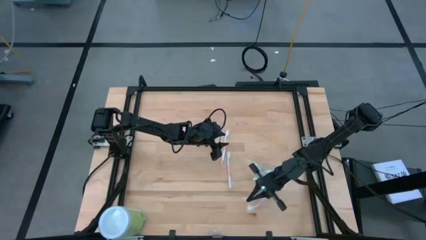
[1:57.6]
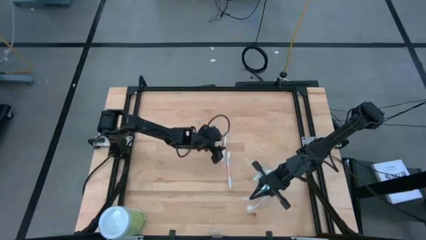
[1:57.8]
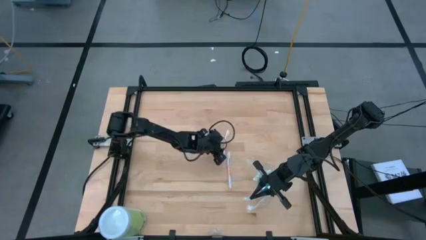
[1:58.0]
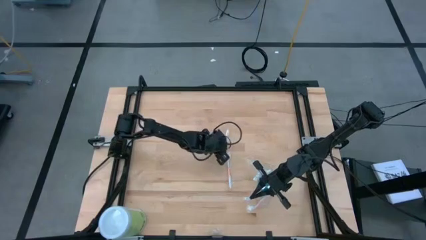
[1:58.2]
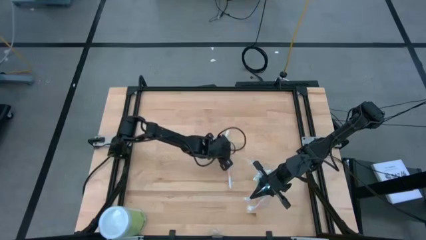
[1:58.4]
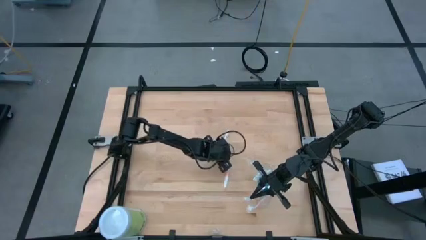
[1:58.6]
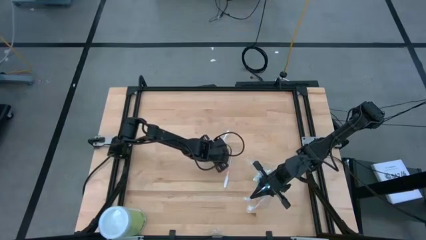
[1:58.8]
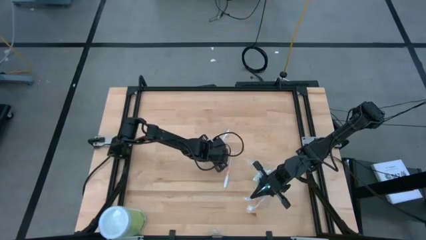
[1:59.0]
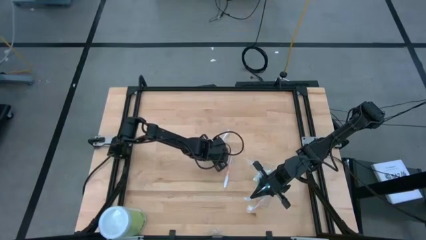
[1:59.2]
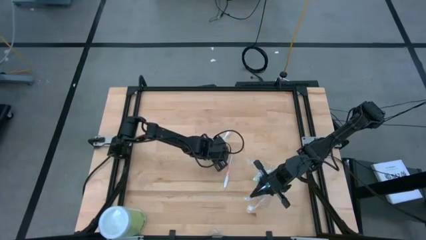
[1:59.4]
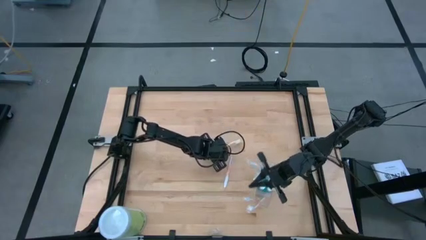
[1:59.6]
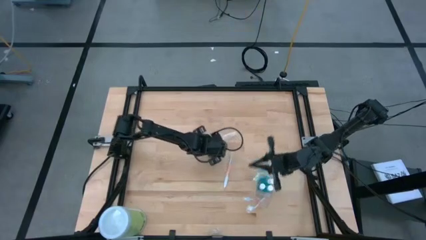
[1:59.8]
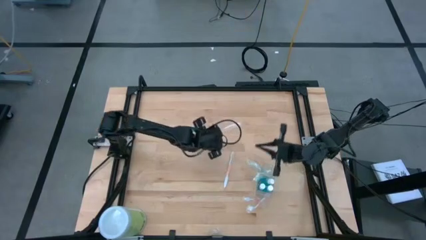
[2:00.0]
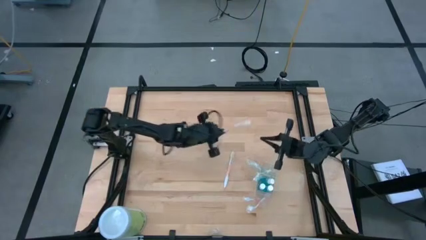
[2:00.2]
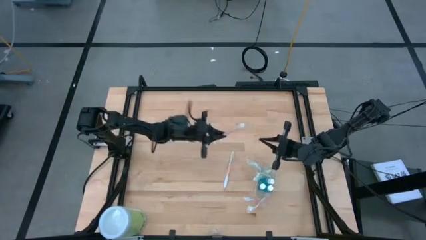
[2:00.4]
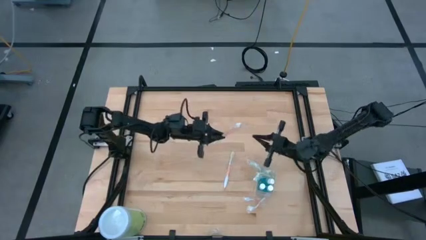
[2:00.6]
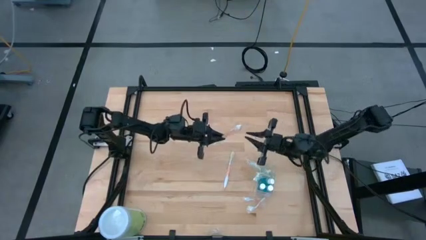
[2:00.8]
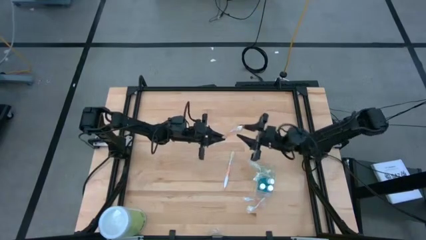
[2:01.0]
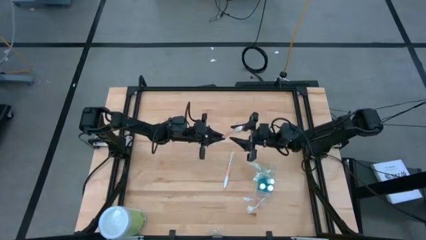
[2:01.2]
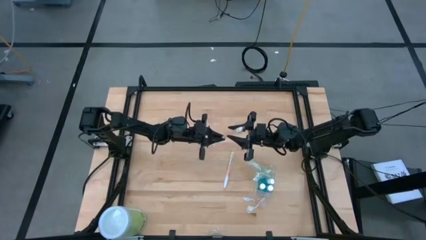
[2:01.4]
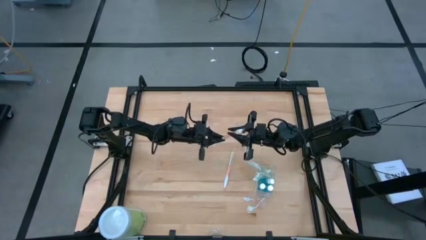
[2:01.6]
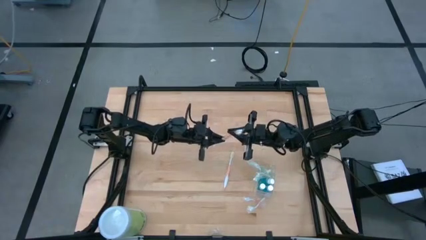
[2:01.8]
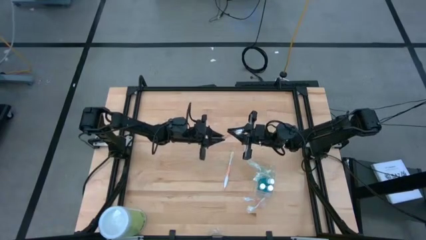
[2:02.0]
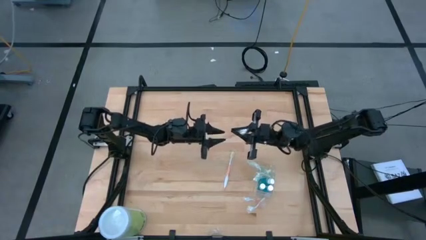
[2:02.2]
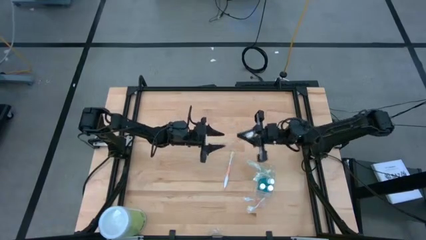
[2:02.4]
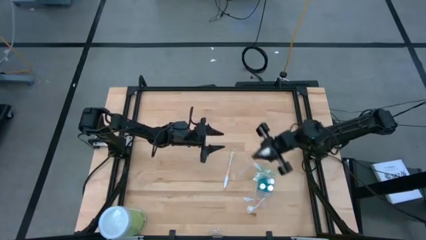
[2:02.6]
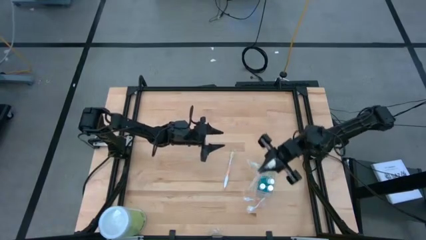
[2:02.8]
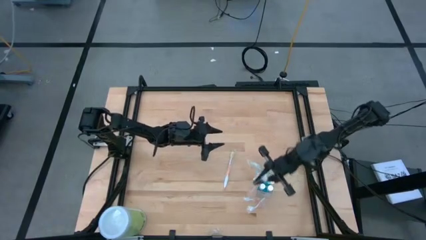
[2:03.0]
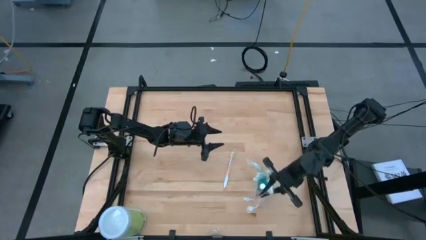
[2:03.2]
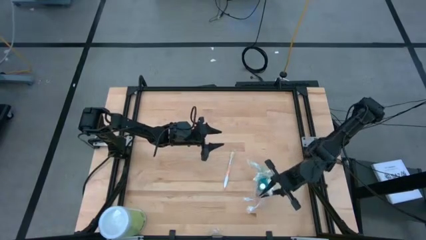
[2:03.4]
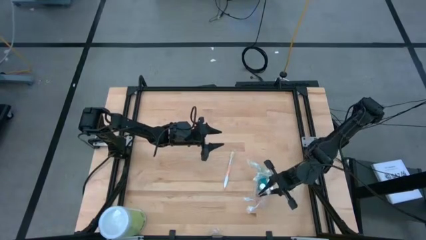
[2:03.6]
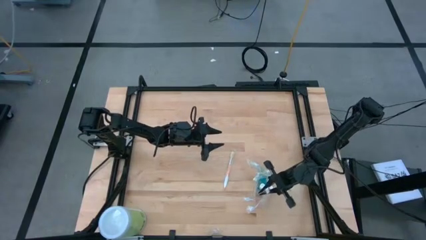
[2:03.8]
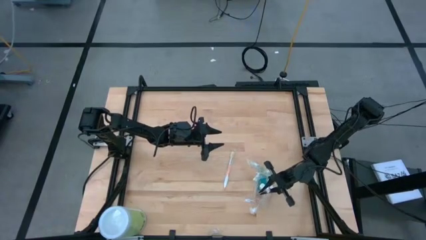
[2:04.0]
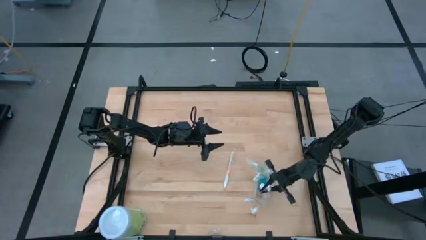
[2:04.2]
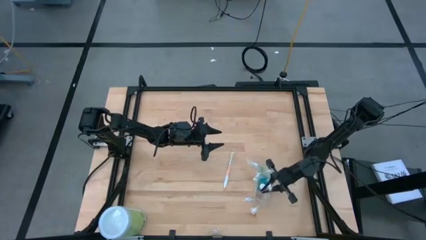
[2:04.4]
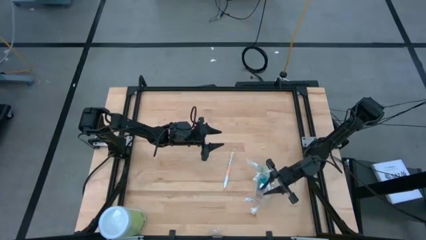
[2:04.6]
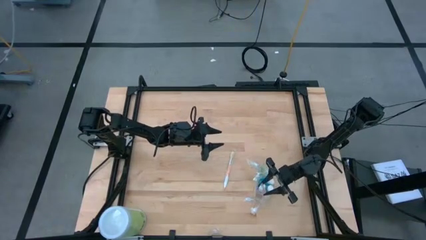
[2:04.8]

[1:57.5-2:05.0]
Task: Pick & Place toothbrushing station
Put the orange toothbrush into the bottom section of the transparent organizer

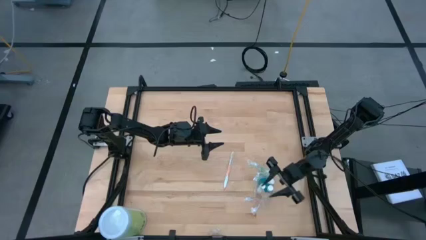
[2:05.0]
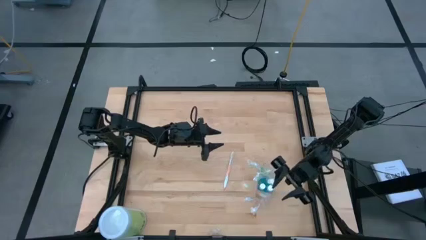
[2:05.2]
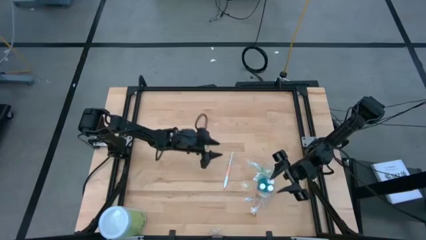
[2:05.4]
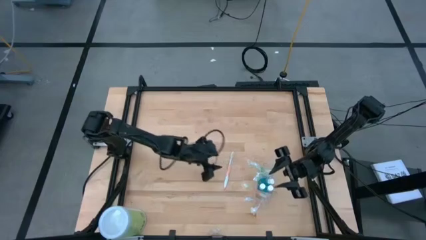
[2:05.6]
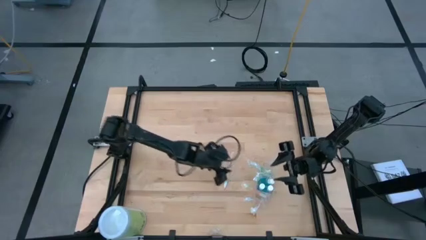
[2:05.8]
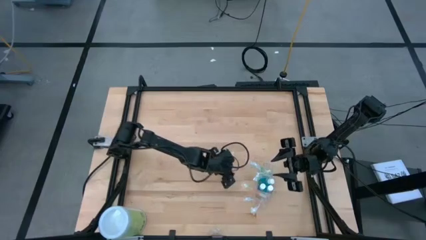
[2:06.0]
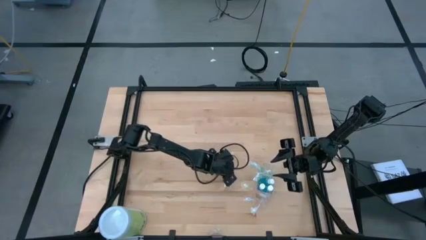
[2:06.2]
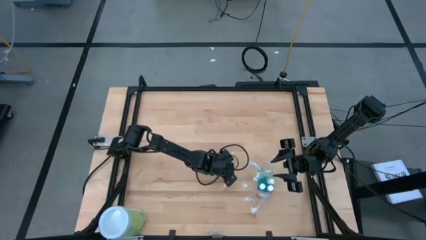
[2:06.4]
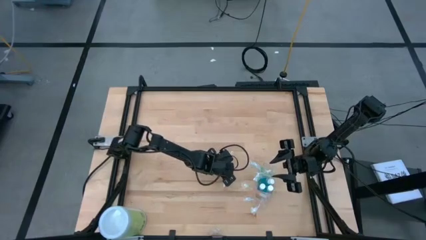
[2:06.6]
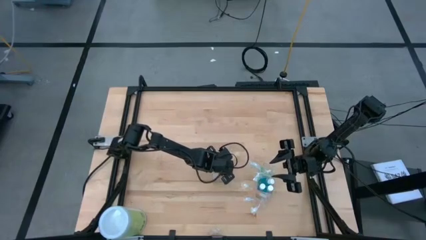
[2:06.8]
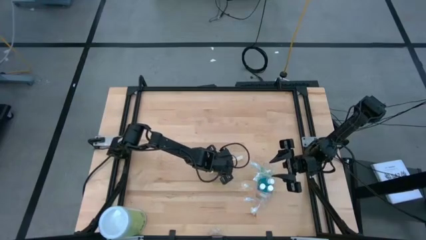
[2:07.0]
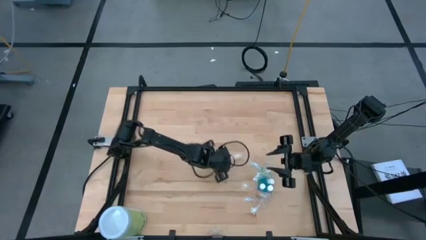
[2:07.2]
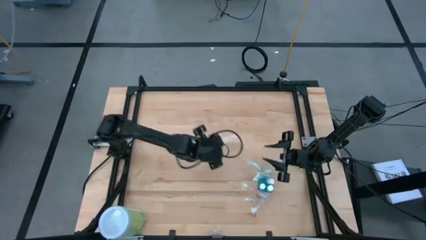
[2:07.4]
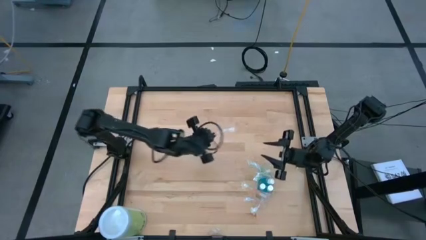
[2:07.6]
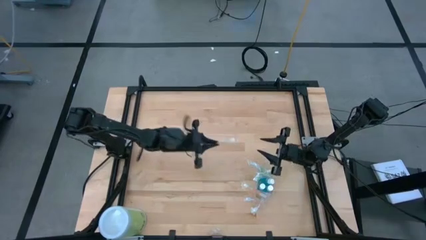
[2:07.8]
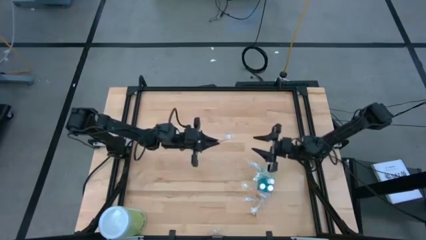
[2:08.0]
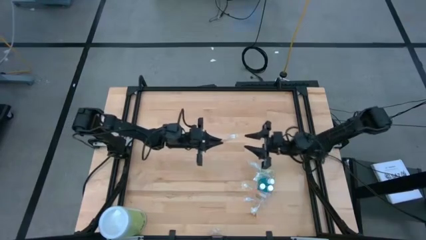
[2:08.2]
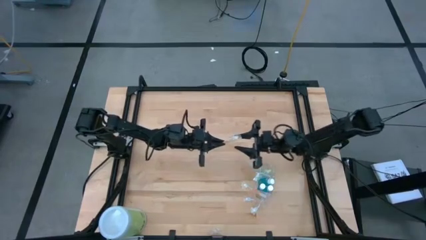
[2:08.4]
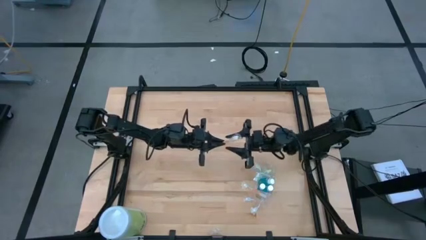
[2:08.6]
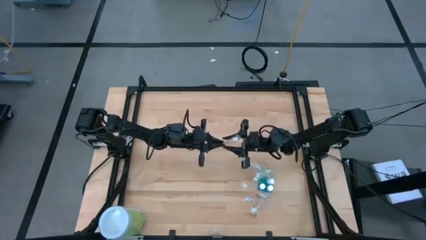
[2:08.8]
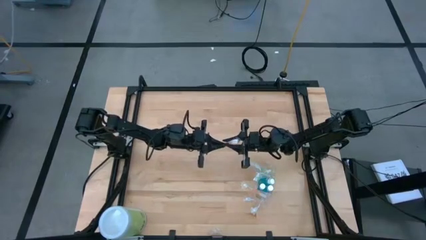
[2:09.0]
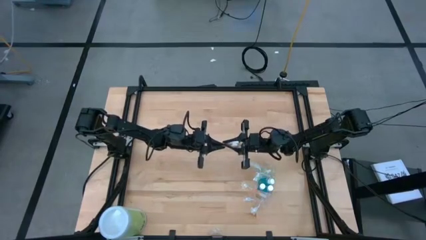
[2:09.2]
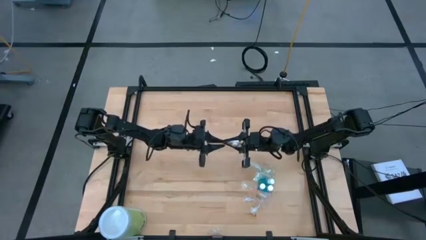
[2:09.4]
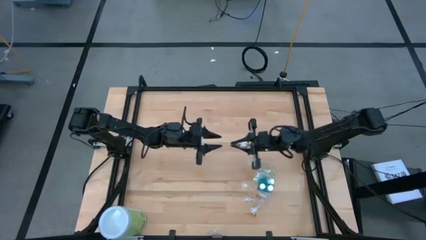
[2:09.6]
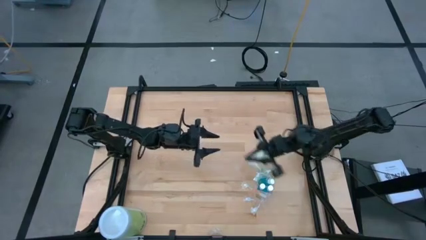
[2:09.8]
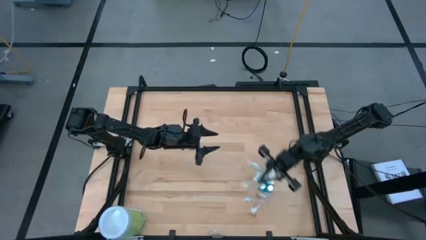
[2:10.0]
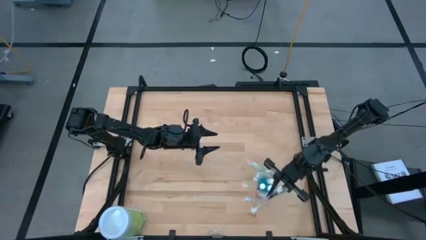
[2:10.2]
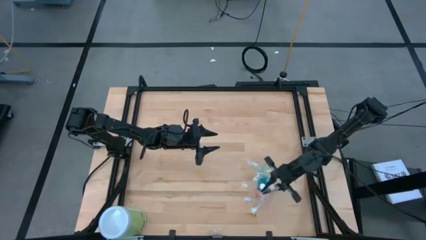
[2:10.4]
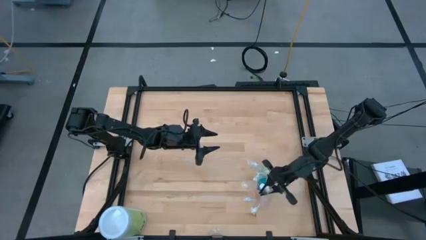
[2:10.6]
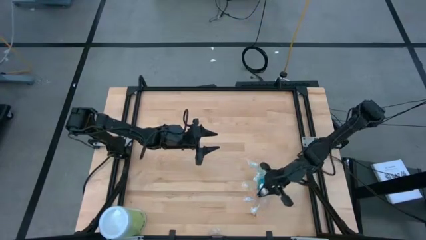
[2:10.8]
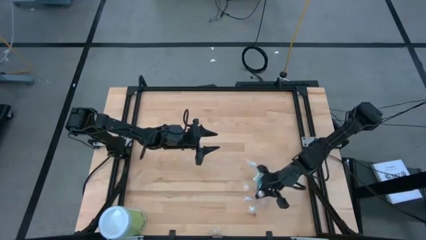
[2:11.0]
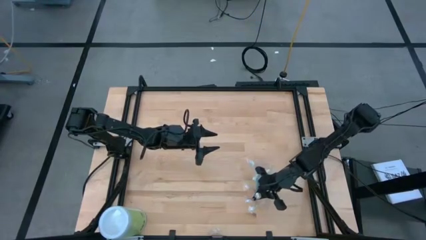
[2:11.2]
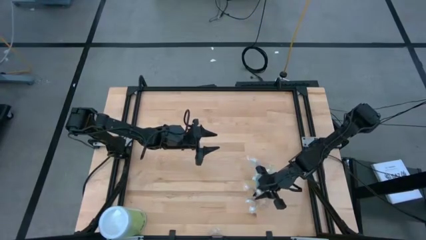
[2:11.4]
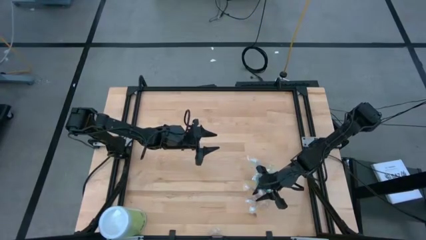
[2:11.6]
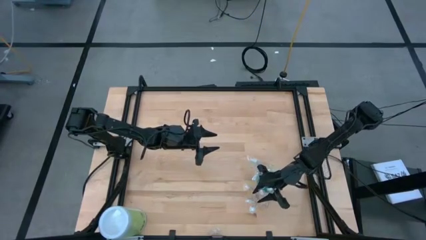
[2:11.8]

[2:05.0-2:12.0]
Put the orange toothbrush into the bottom section of the transparent organizer

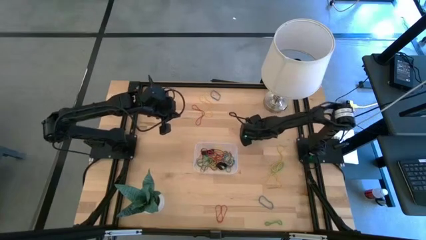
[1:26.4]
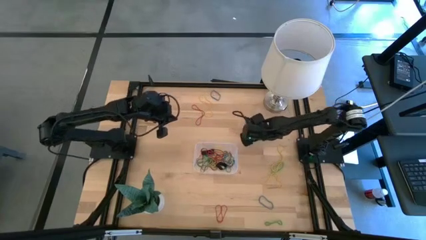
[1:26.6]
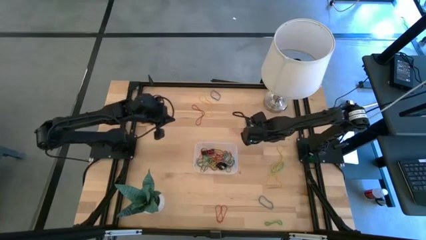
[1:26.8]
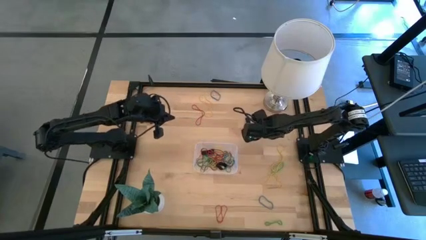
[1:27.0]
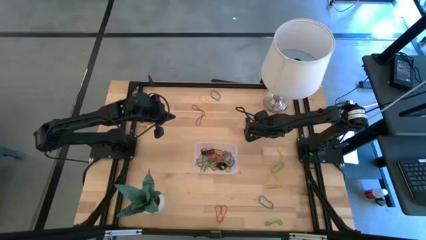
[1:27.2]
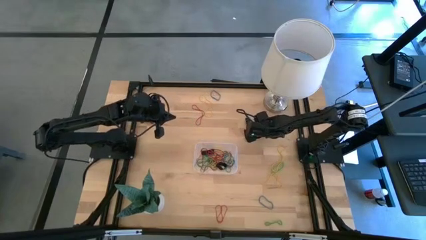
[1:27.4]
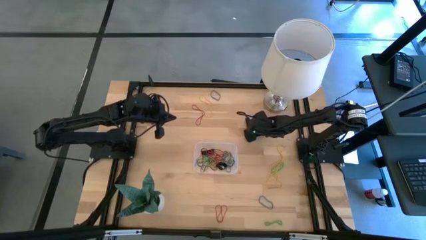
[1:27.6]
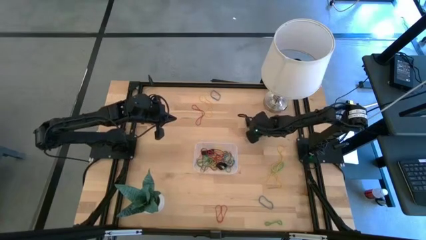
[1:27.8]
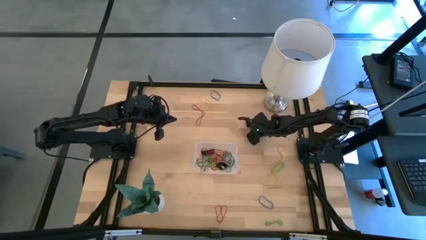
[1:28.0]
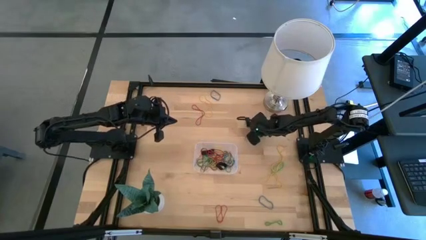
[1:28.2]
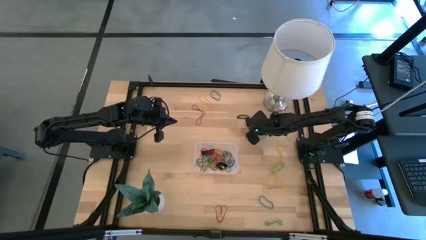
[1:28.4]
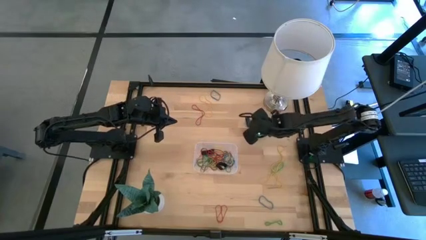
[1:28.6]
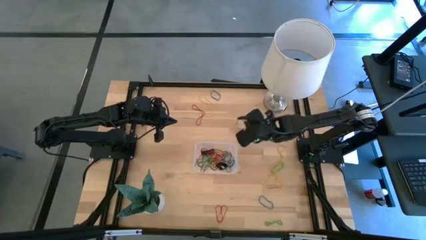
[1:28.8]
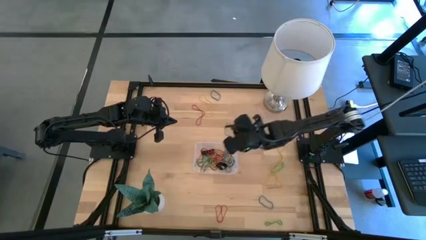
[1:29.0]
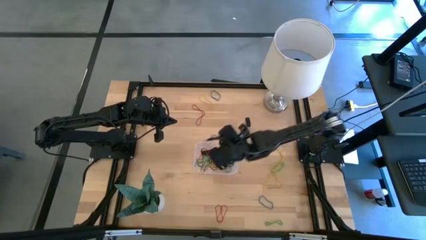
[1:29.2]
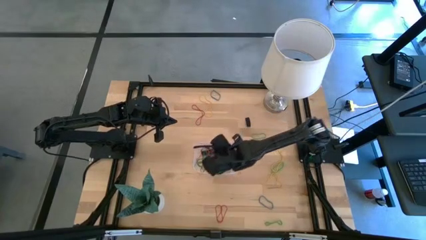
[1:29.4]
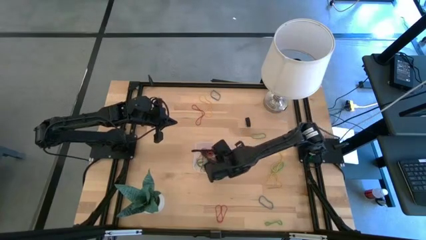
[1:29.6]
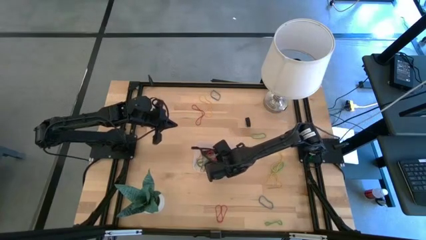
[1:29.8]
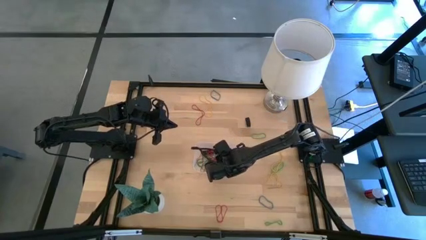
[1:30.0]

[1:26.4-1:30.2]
Task: Pick and place rubber bands into bin
Put the blue rubber band into the transparent bin
